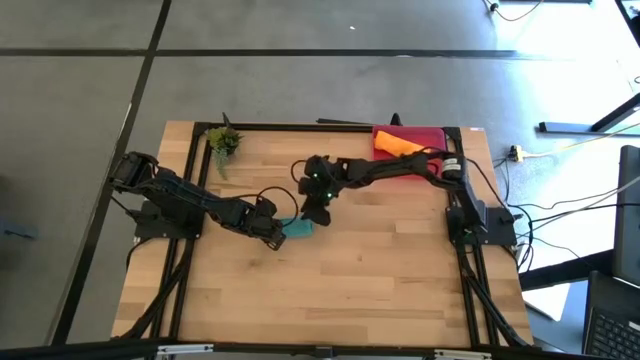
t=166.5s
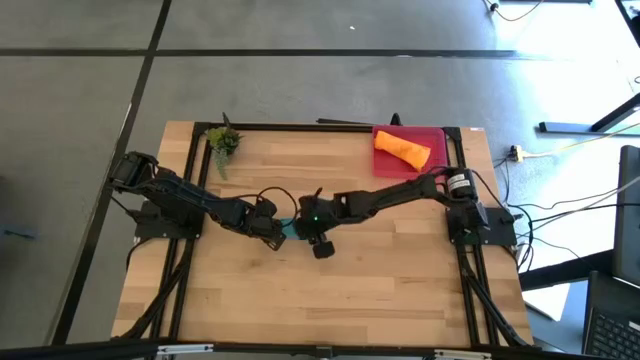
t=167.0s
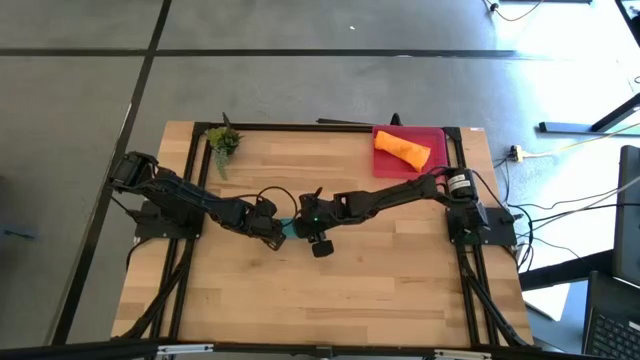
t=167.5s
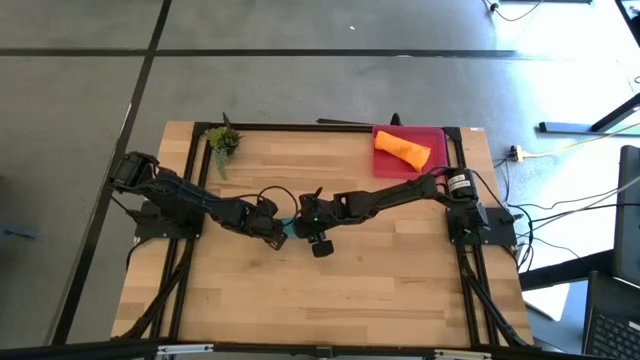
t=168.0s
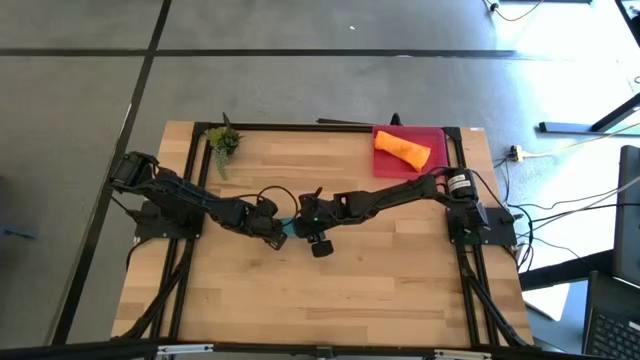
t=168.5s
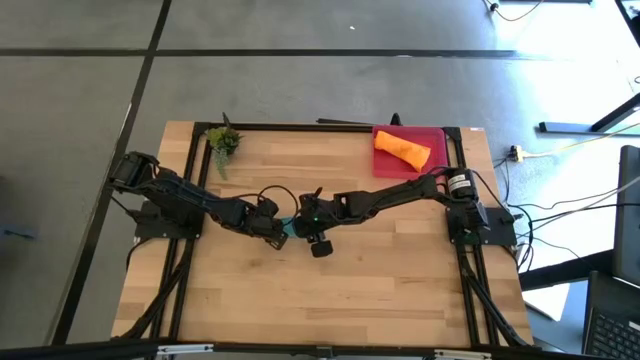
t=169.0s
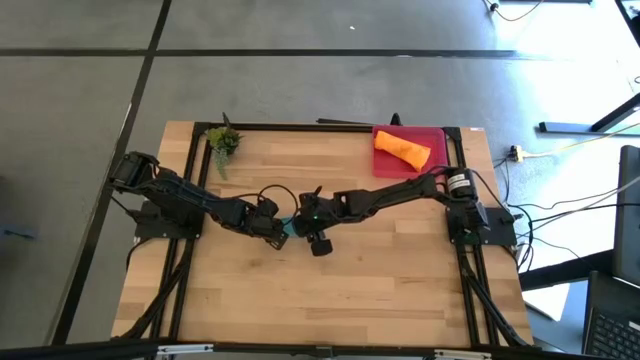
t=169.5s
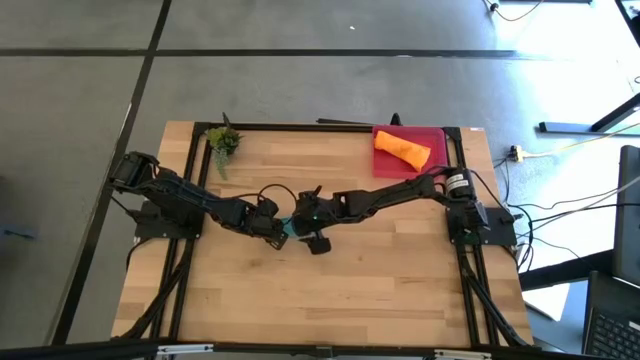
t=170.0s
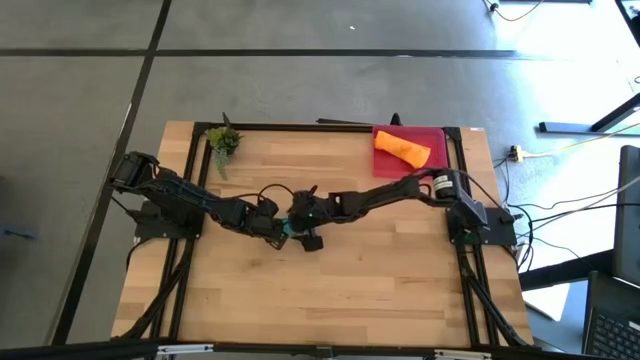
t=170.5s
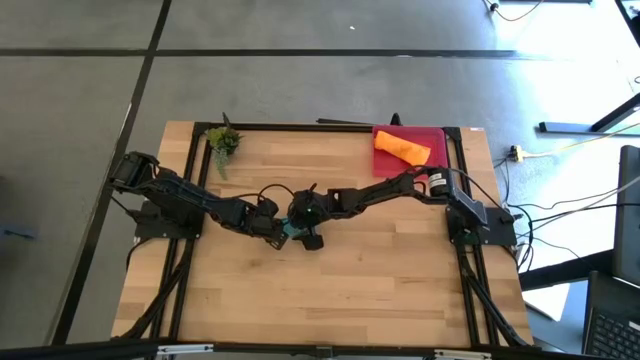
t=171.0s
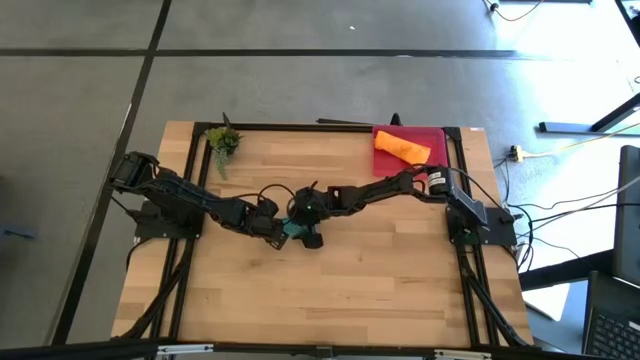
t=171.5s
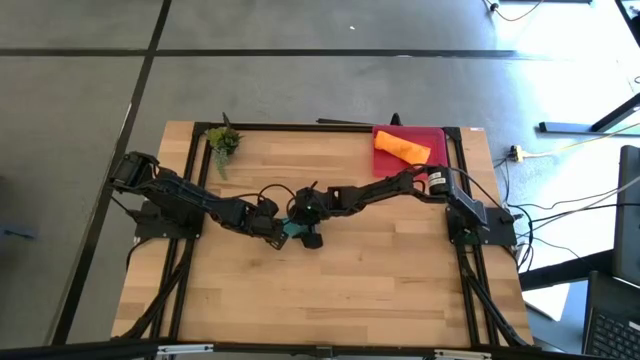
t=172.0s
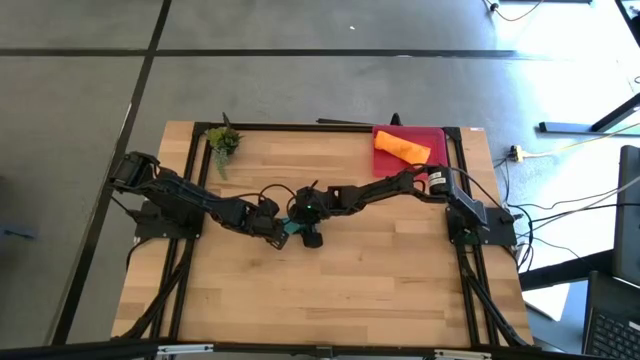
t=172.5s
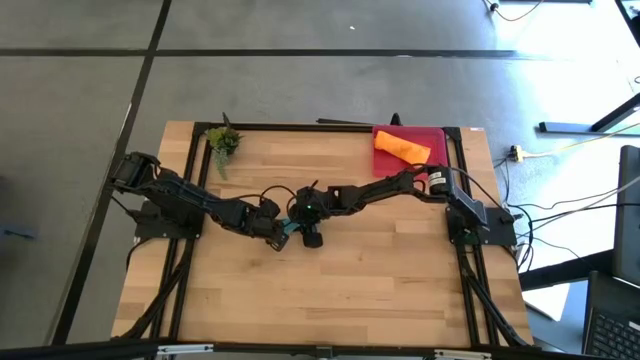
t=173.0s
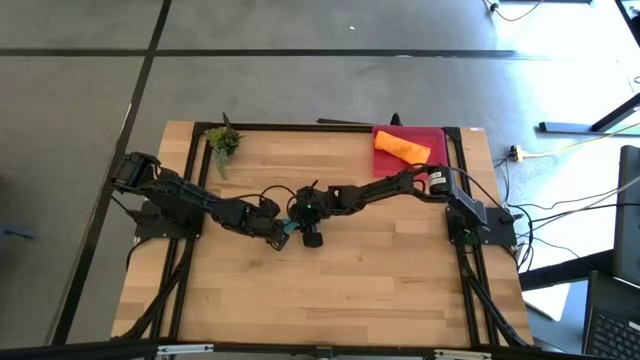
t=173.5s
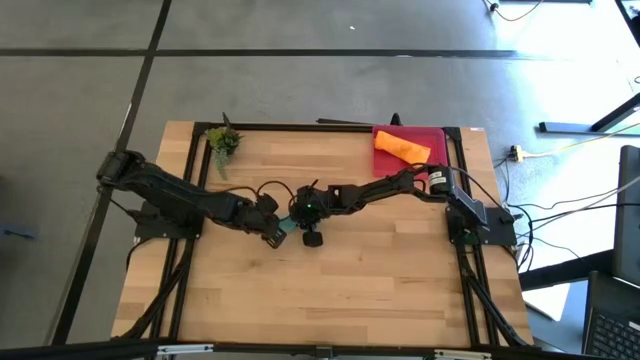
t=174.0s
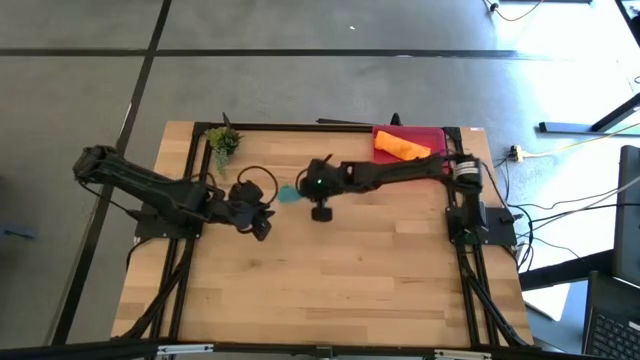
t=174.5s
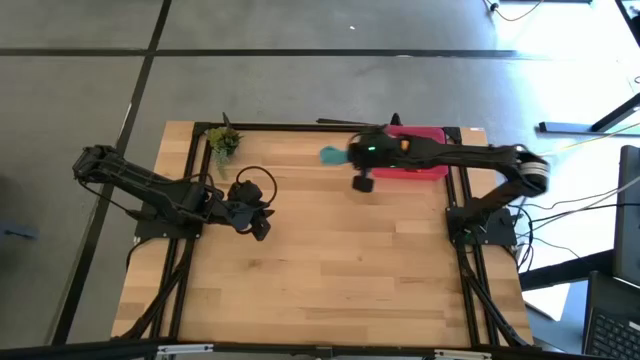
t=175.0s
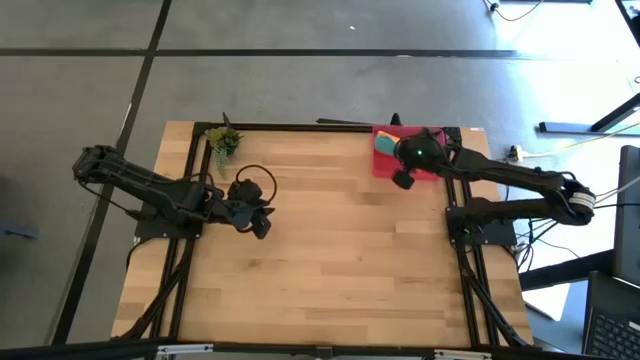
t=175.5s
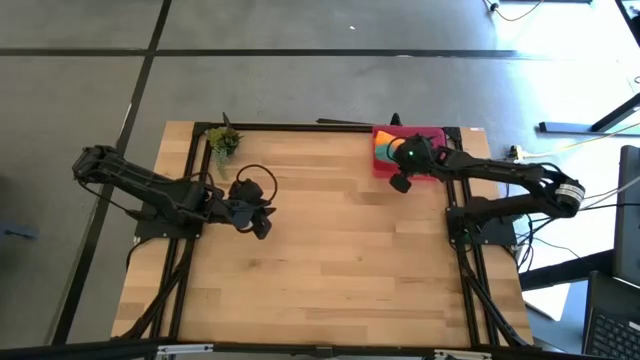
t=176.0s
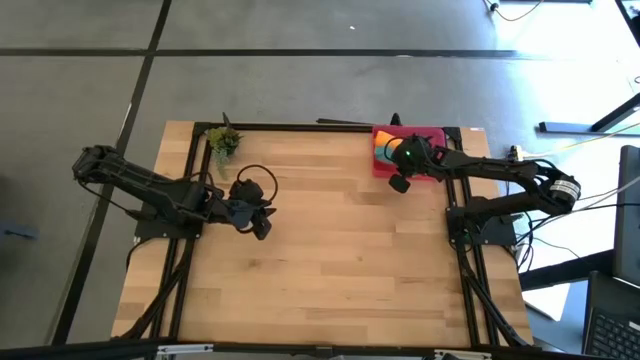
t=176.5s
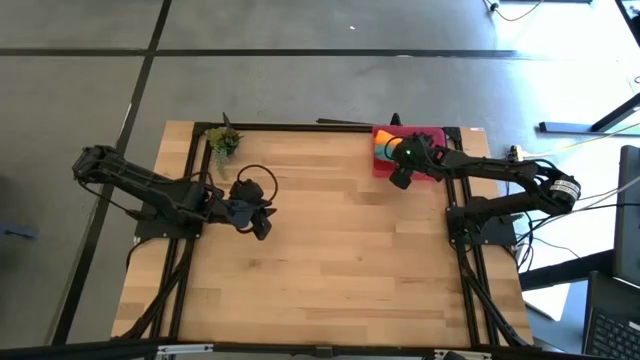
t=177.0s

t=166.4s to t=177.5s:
Task: Roll microfiber towels into tight, uniform cylinder then place into a basket
Put the rolled blue microfiber towel into the red bin

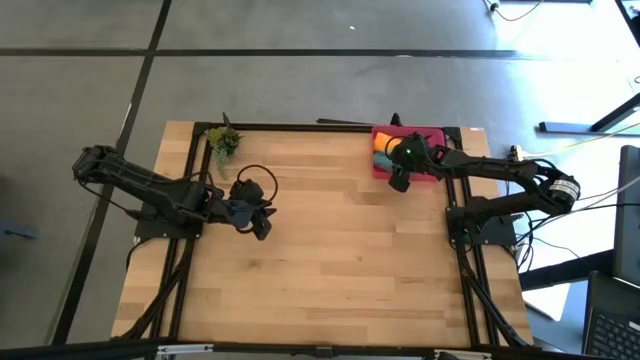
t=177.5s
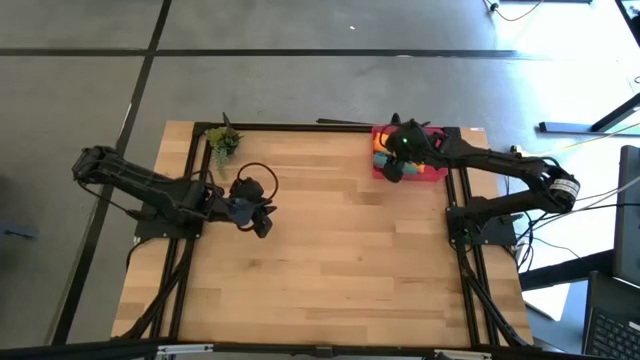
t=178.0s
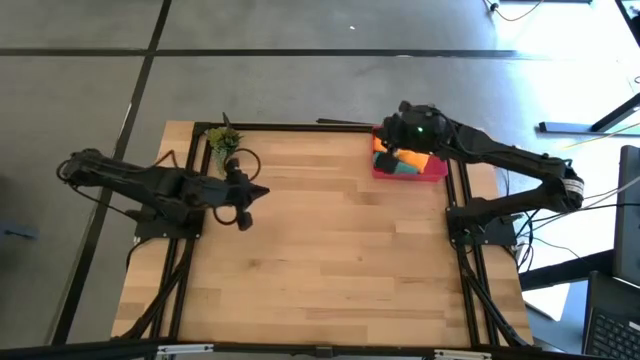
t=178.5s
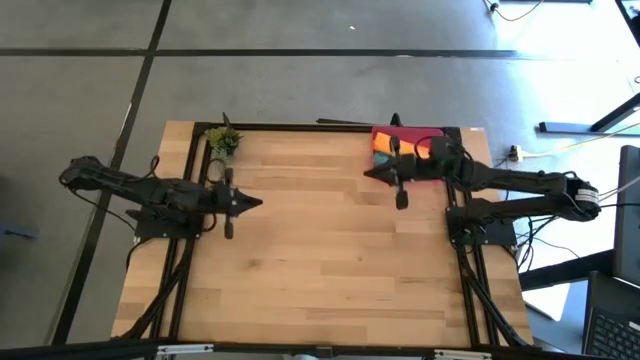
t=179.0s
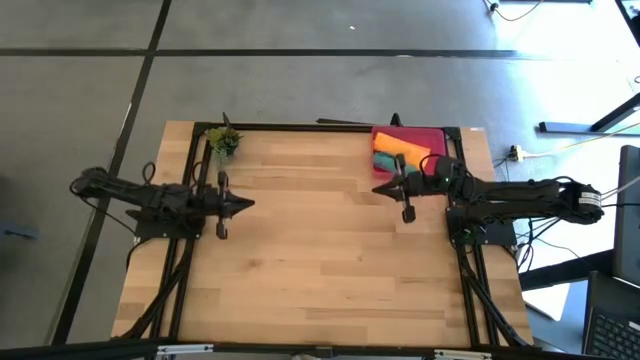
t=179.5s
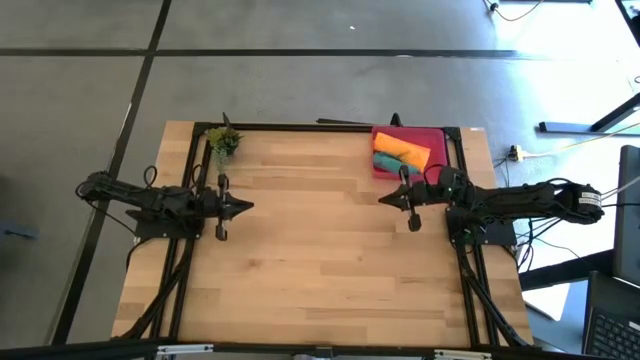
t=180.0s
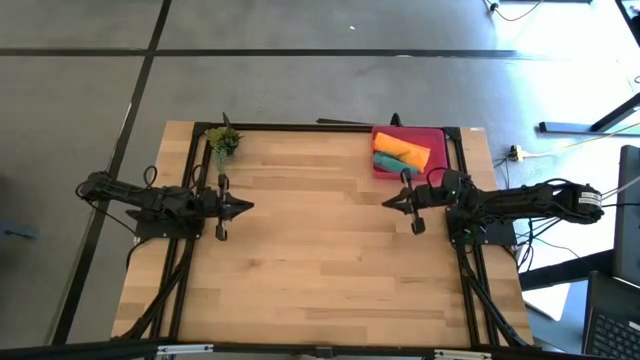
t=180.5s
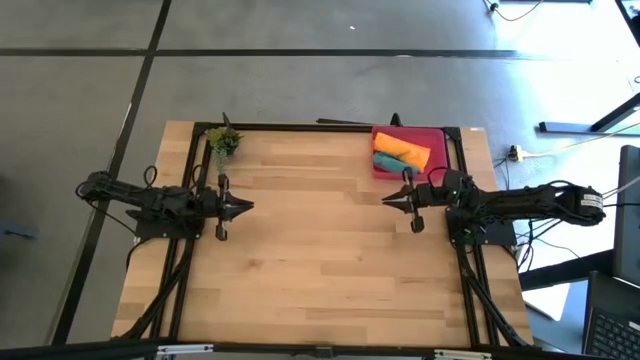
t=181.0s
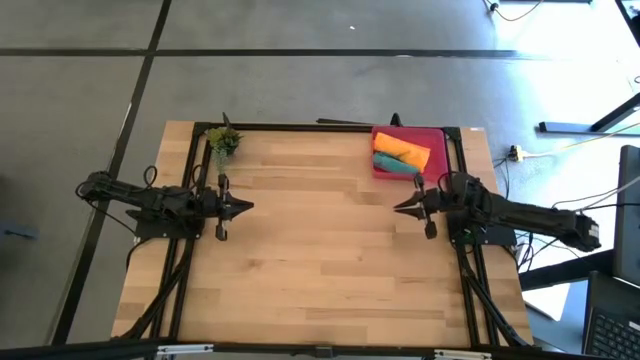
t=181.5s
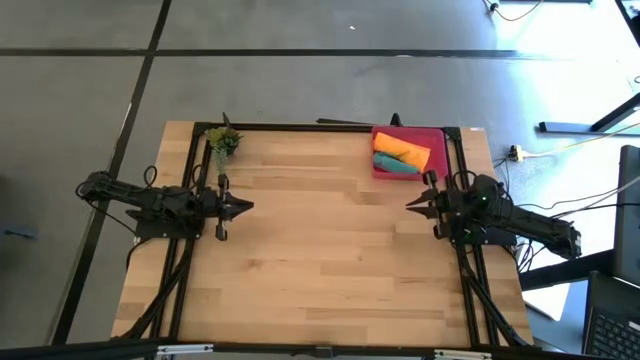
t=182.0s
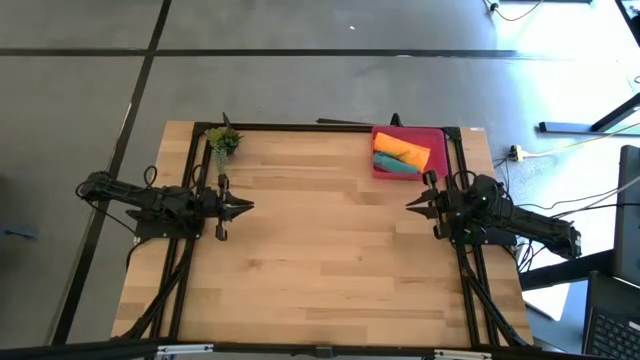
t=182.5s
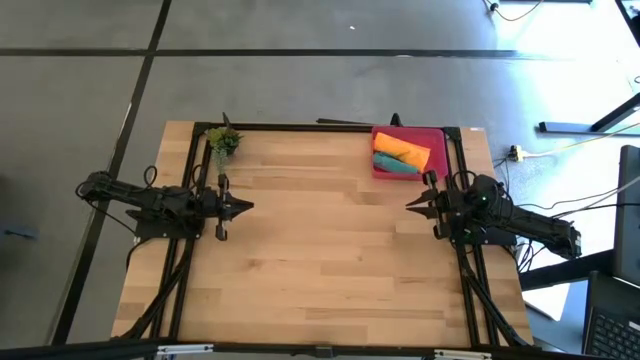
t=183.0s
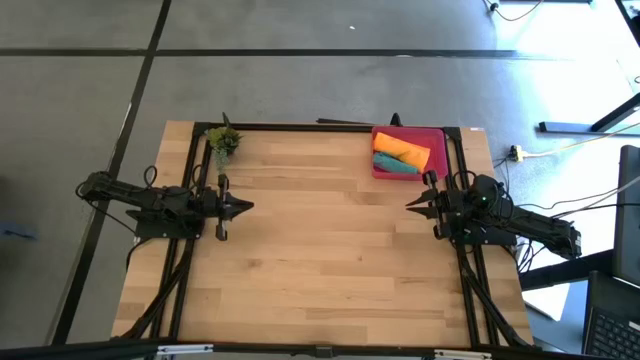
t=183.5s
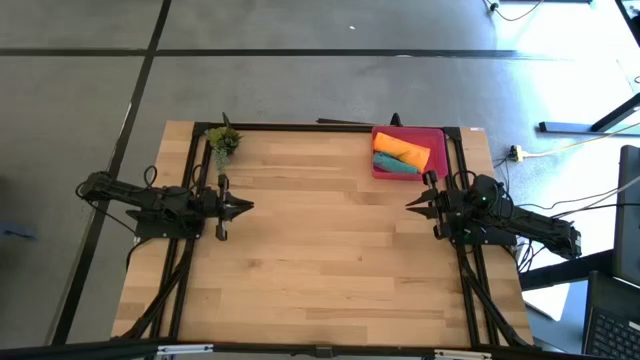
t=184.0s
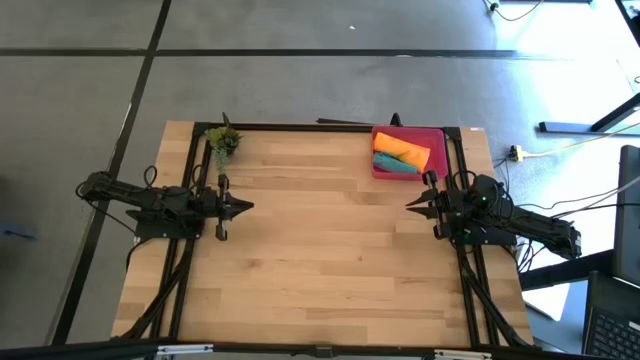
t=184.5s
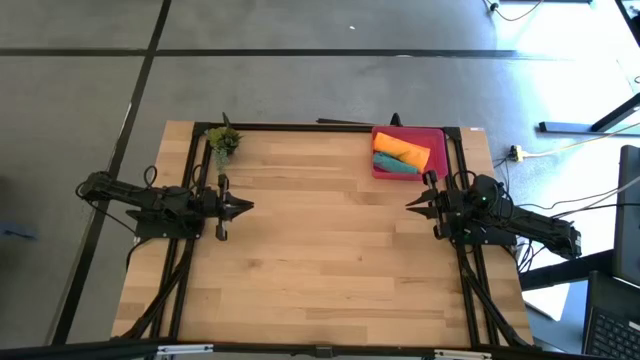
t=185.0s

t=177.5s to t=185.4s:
Return to Home Position
